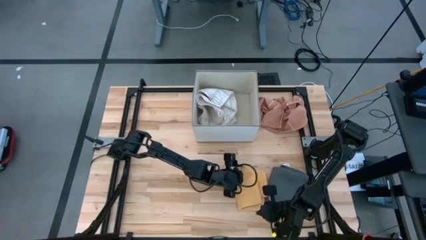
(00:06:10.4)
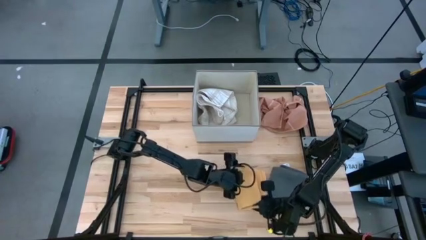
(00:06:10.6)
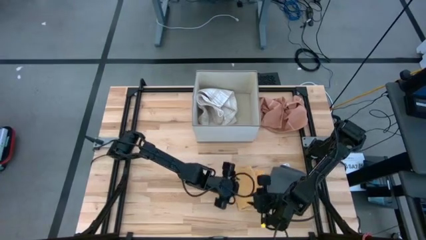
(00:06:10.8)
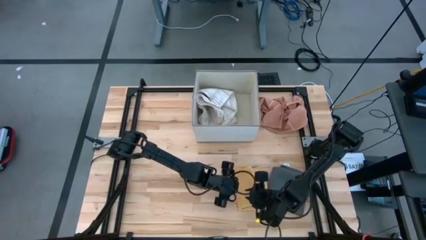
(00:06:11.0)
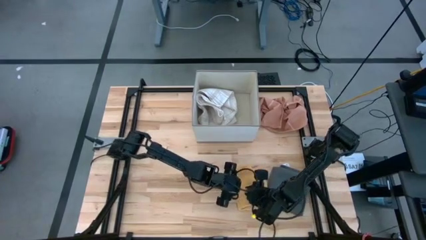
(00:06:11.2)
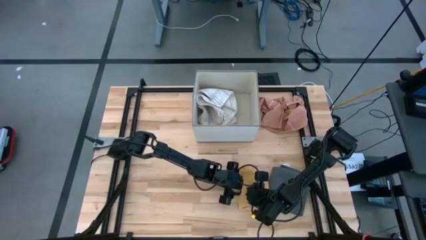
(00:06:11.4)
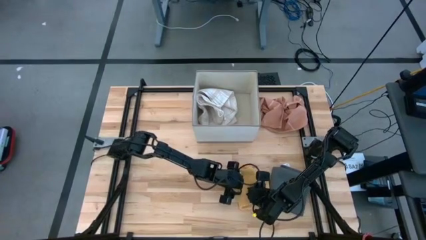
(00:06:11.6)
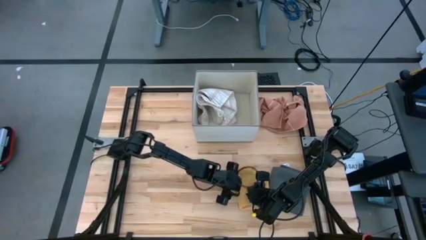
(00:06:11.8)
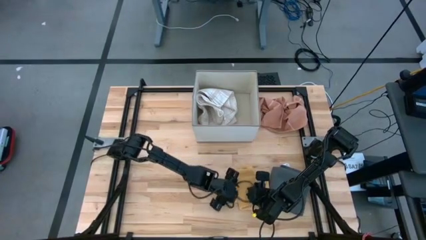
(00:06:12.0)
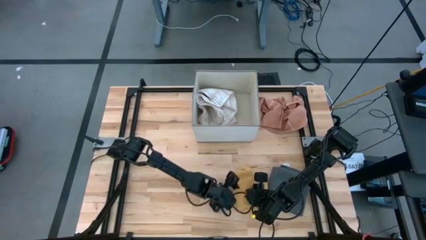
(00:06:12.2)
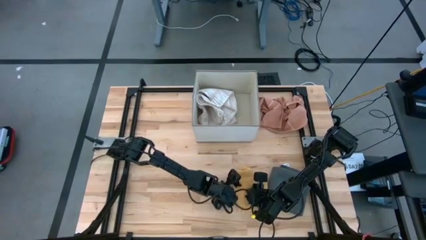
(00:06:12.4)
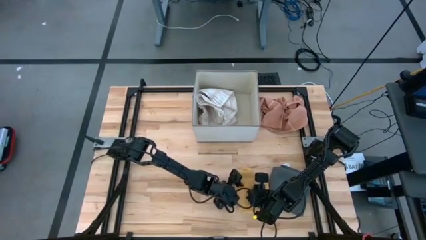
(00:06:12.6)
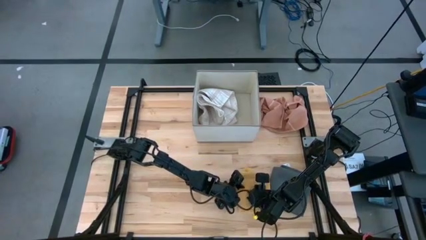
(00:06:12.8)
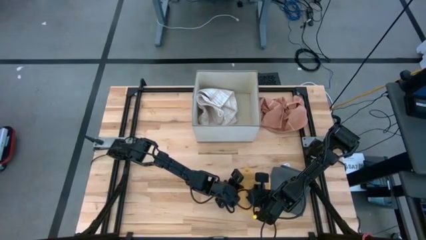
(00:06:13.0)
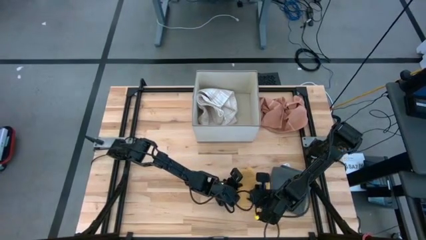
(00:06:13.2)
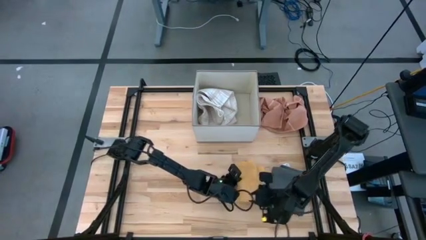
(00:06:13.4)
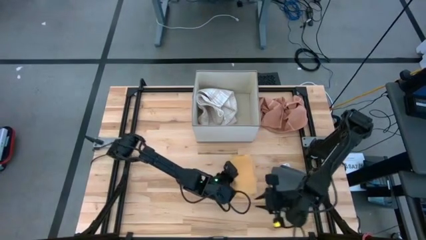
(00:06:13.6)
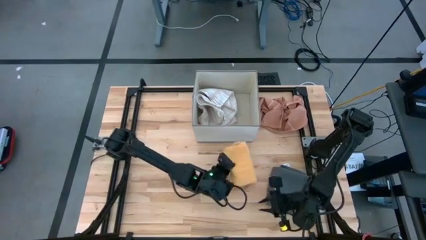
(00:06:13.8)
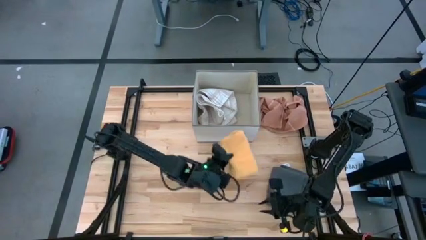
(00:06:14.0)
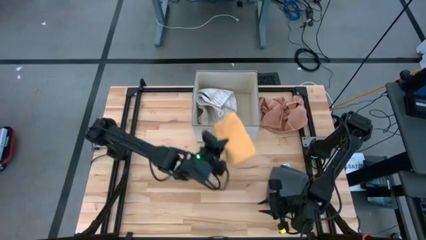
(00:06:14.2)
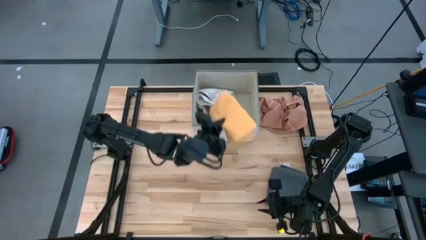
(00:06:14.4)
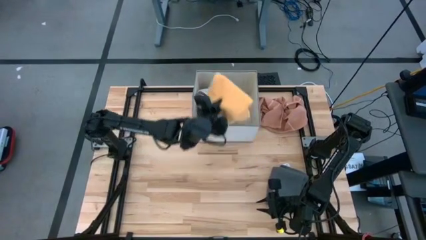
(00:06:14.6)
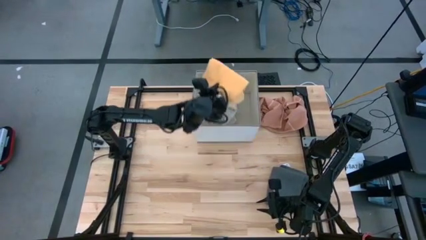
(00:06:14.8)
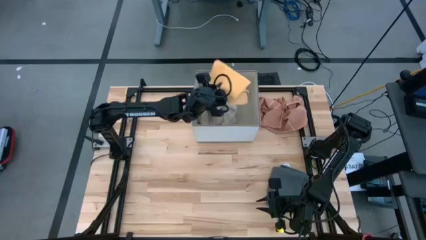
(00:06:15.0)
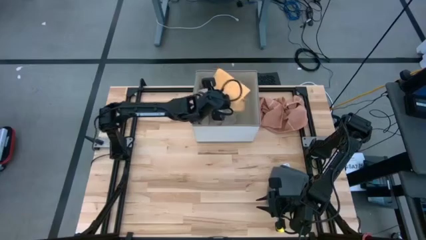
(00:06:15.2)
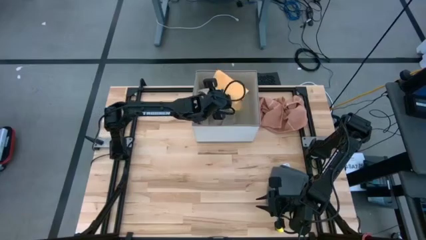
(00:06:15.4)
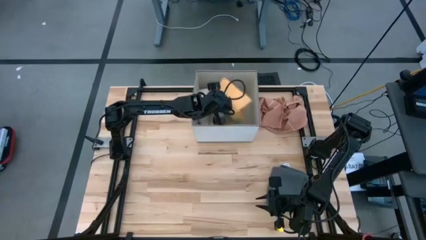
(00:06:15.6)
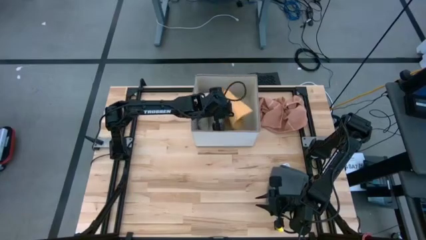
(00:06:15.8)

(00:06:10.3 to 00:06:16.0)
Task: Fold towel
Put the yellow towel into the laundry bin

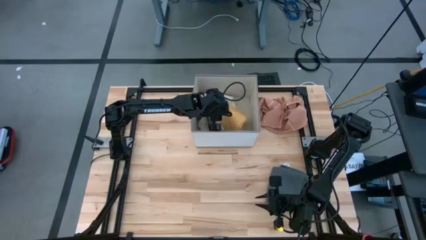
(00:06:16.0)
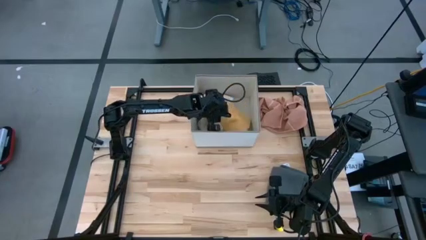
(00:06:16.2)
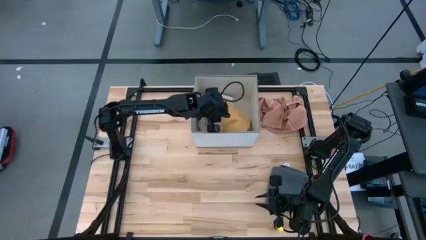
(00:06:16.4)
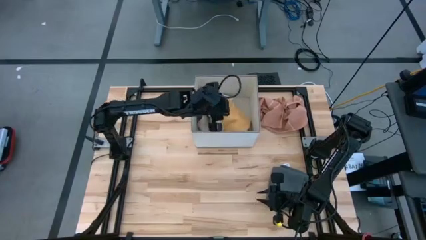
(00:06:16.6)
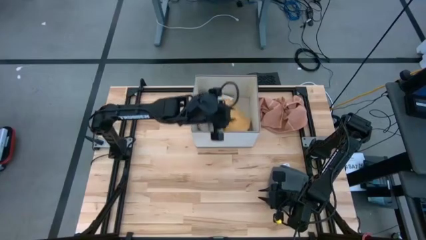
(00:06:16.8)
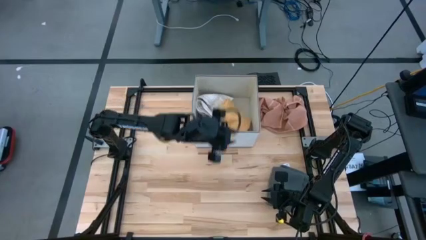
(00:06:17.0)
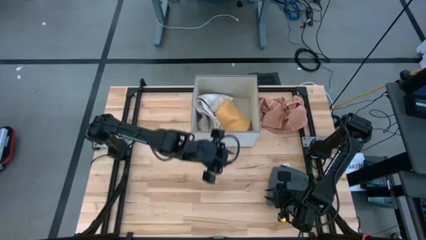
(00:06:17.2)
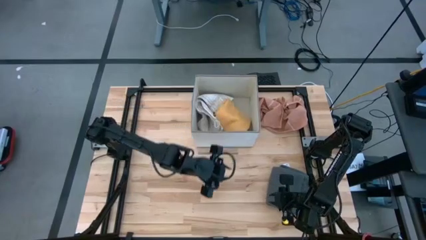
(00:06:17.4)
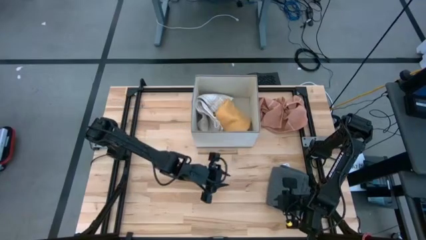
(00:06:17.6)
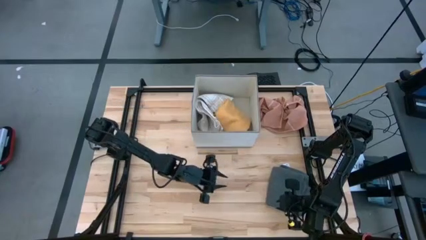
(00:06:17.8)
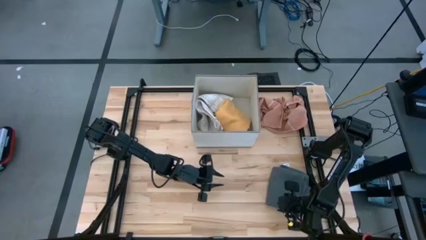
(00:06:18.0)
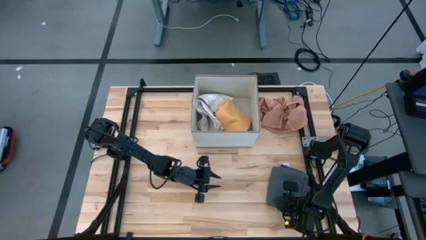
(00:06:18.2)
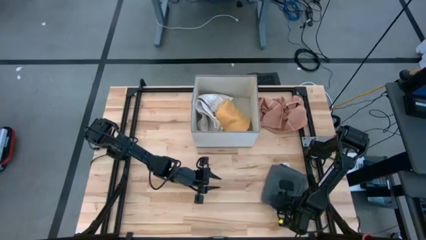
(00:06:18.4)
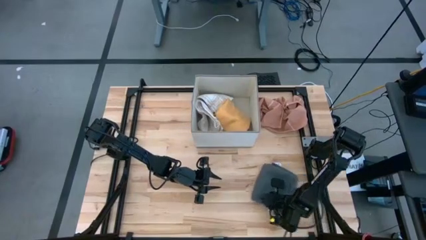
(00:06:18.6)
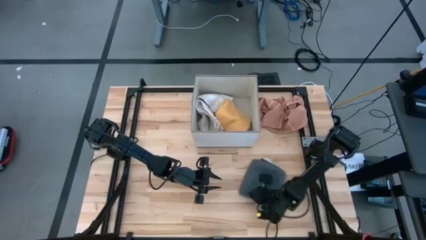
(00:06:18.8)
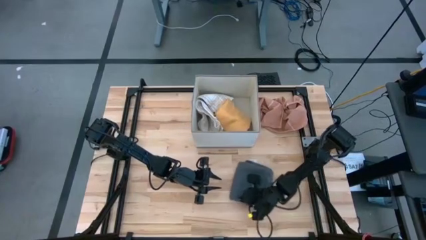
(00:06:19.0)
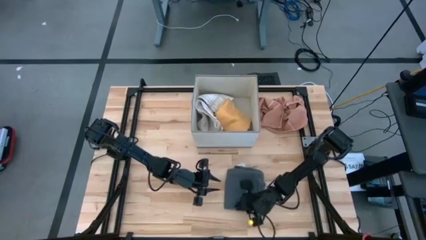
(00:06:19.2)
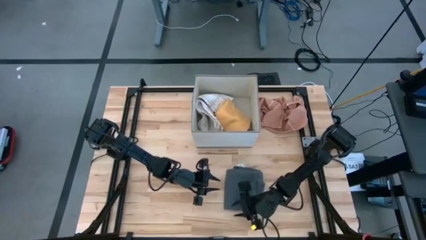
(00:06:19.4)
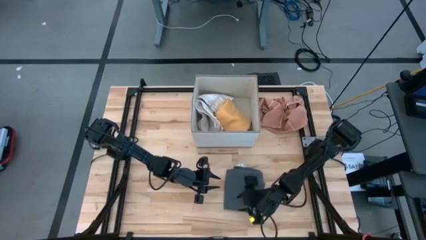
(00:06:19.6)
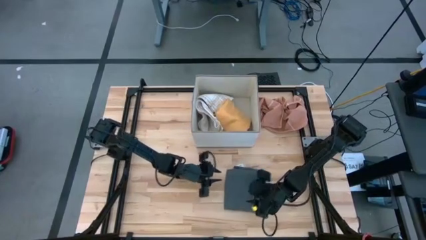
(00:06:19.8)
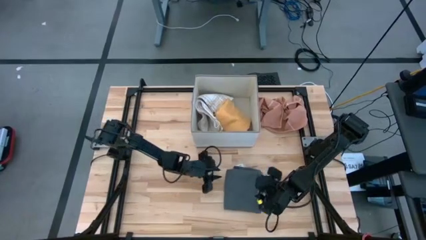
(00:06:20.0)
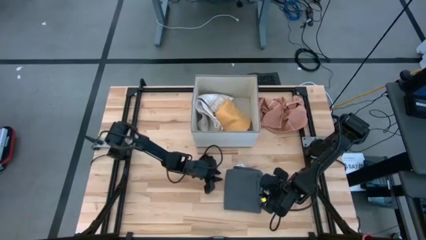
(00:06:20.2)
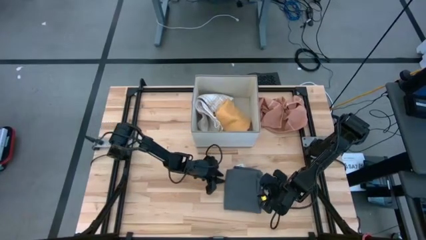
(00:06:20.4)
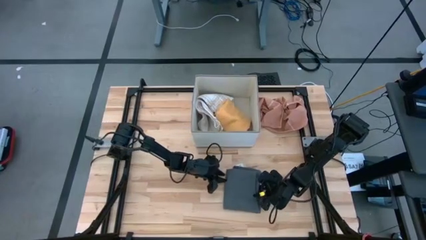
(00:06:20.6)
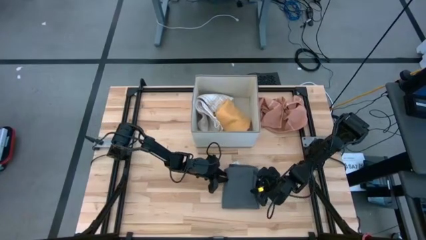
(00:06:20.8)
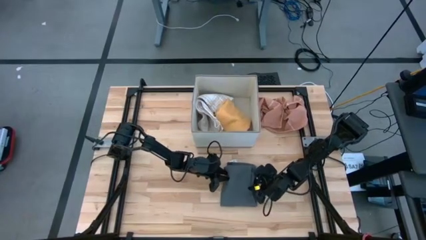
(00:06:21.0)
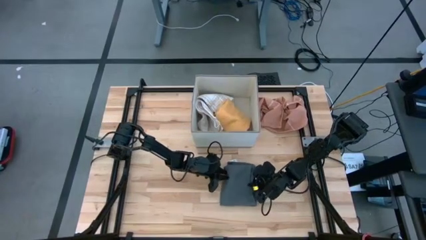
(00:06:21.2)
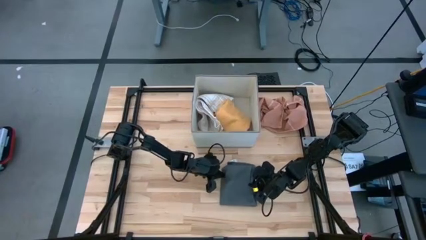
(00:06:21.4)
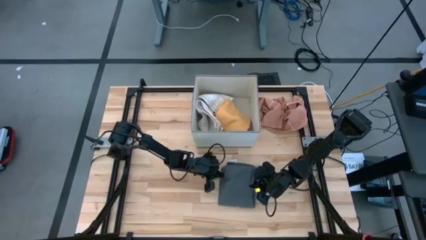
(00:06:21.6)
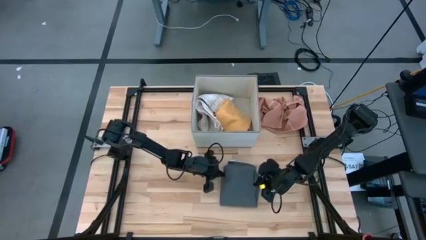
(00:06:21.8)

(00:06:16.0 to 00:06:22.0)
Put the gray towel into the laundry bin

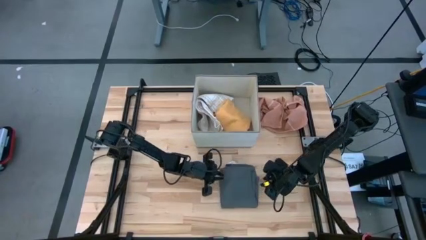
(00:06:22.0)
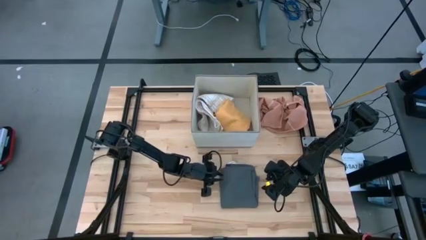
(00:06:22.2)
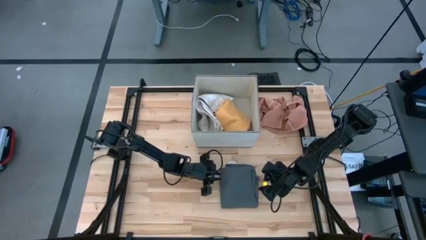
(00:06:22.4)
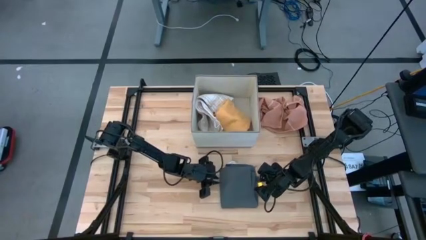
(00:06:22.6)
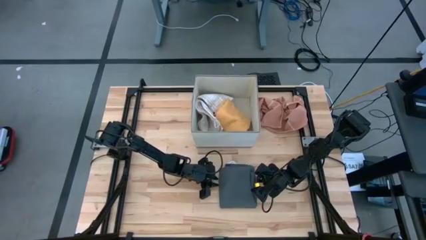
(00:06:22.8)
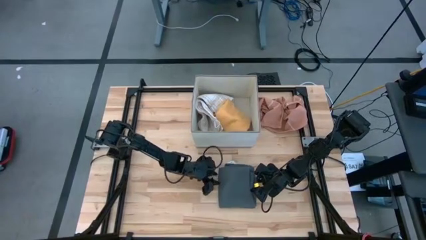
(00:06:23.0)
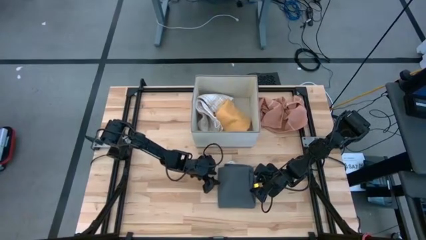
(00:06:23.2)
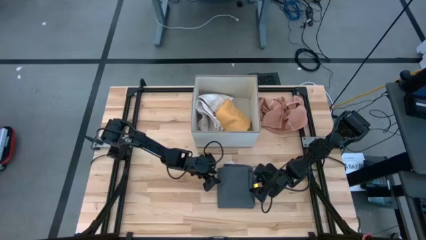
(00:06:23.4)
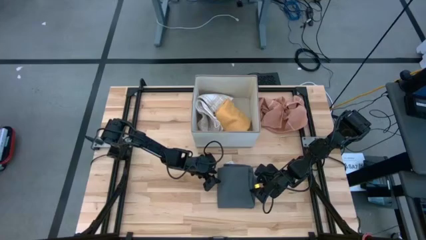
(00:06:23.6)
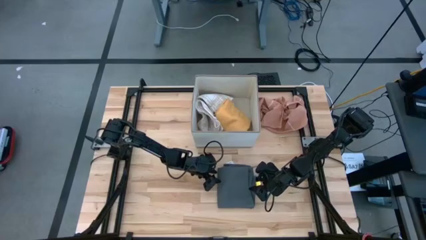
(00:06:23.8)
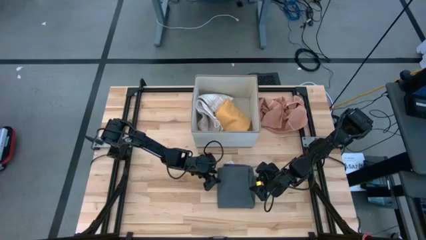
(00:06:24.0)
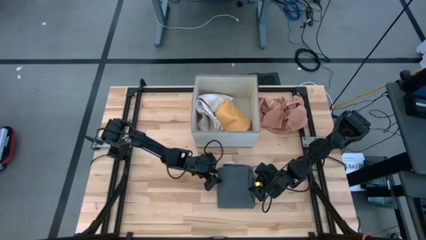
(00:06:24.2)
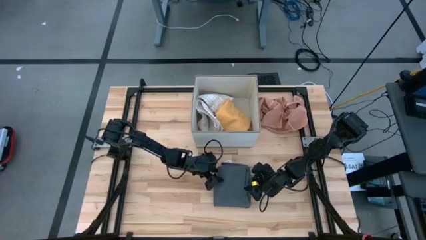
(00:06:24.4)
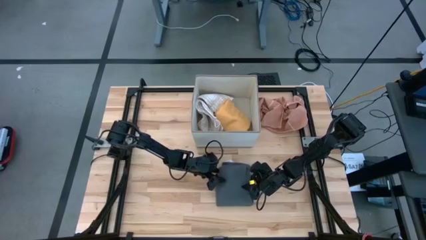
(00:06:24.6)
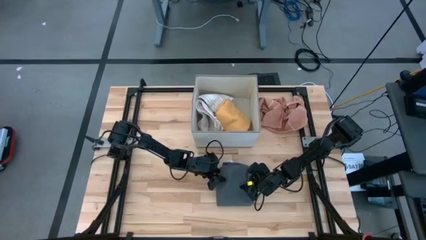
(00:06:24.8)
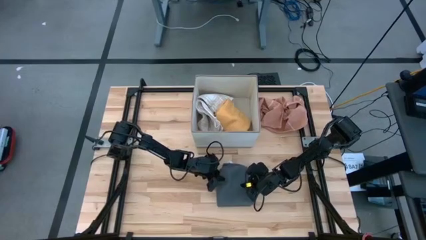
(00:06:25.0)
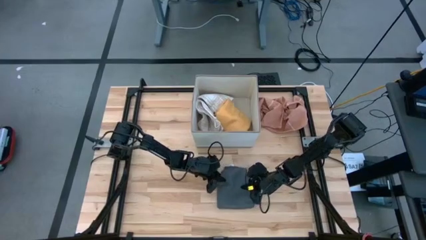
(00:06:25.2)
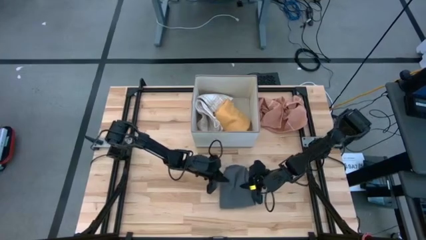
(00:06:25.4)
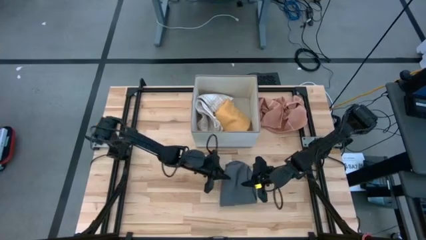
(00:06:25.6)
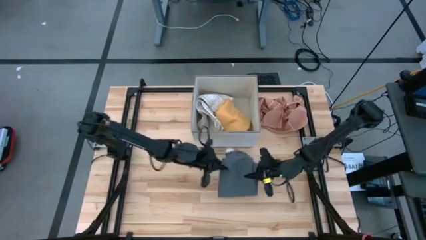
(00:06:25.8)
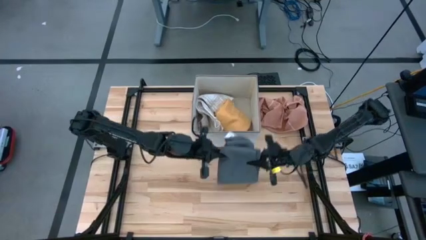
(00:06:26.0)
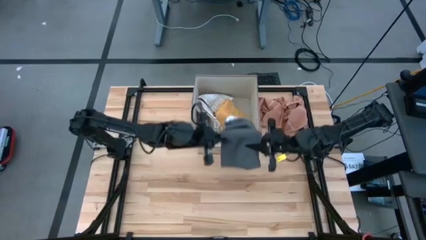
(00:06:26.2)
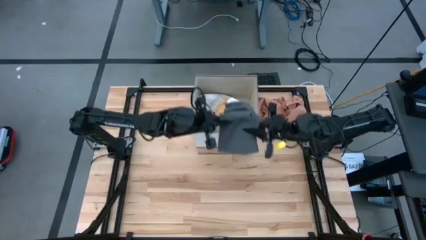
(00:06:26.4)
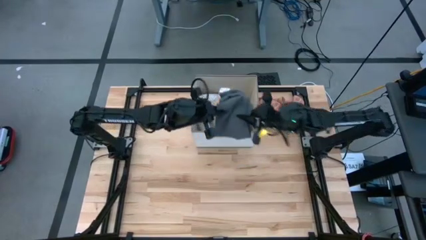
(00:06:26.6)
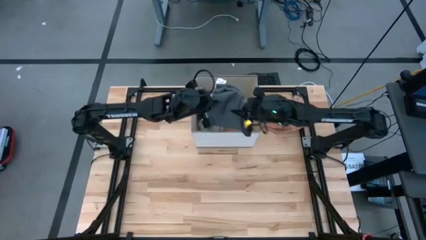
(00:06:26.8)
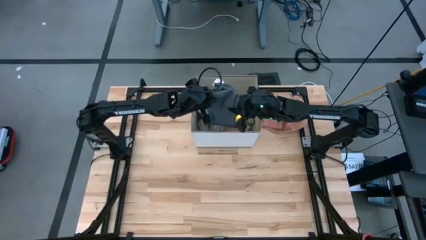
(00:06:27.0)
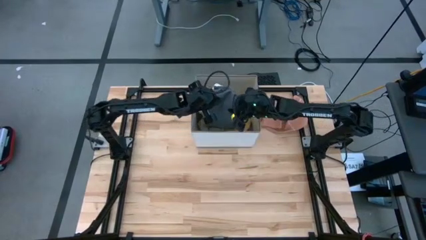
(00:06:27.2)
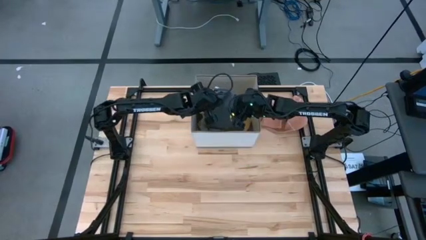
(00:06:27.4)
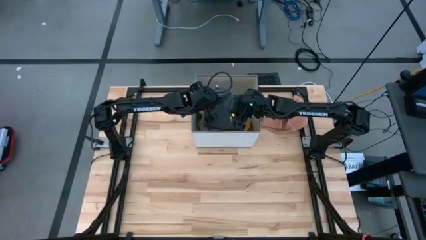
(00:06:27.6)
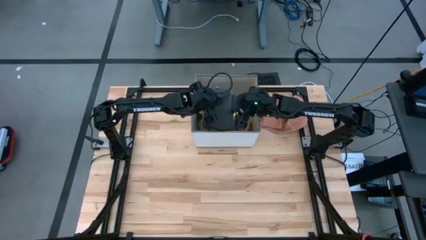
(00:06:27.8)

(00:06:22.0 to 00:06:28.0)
Put the gray towel into the laundry bin
